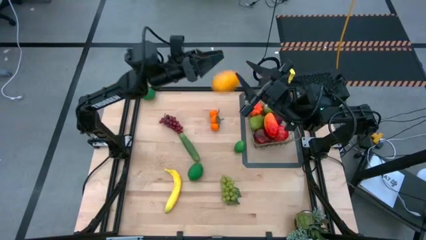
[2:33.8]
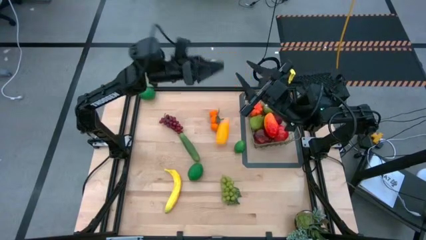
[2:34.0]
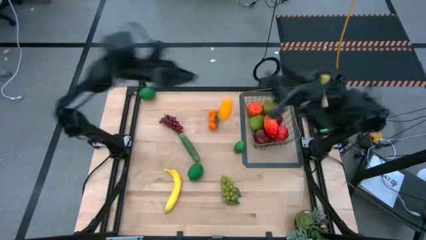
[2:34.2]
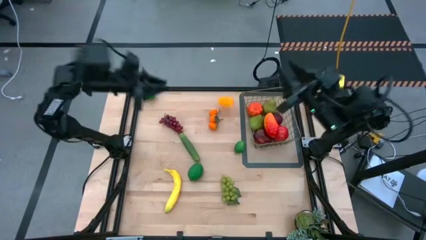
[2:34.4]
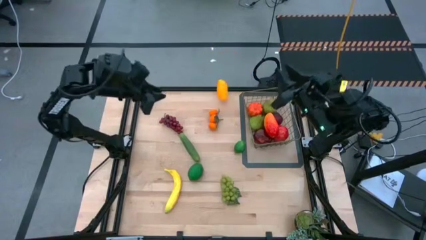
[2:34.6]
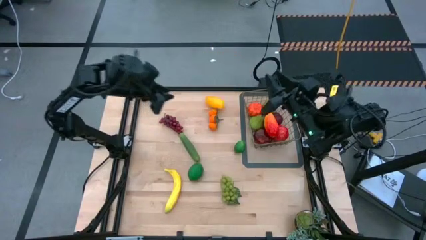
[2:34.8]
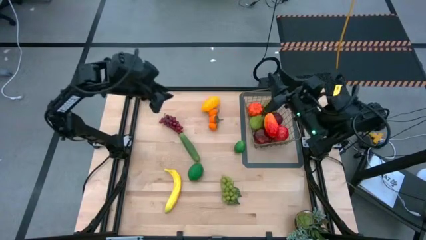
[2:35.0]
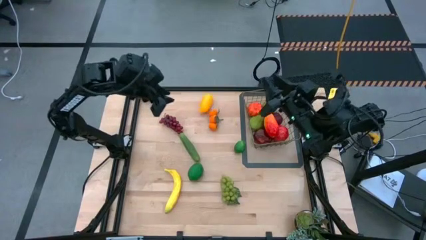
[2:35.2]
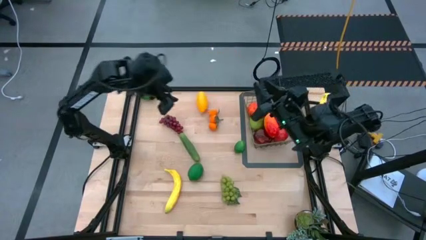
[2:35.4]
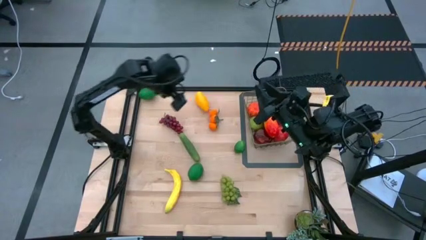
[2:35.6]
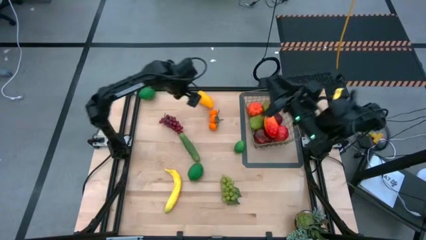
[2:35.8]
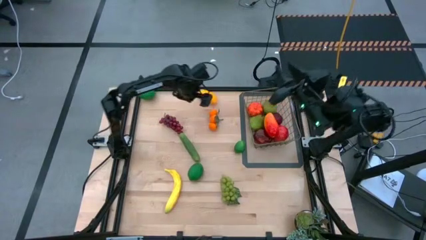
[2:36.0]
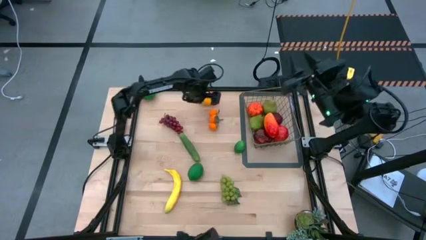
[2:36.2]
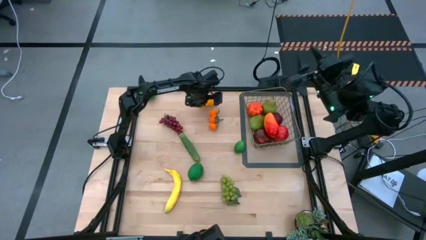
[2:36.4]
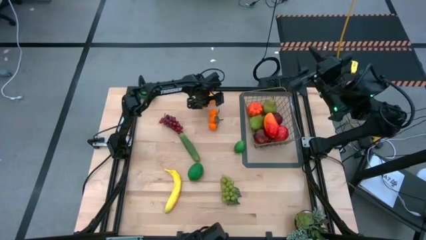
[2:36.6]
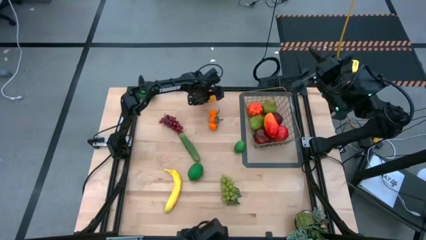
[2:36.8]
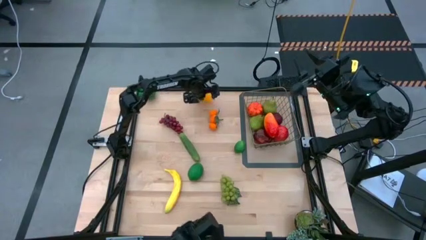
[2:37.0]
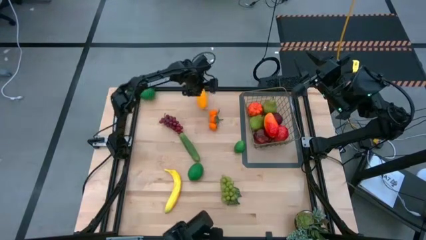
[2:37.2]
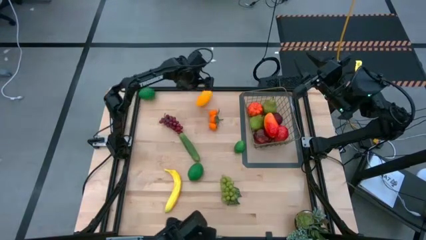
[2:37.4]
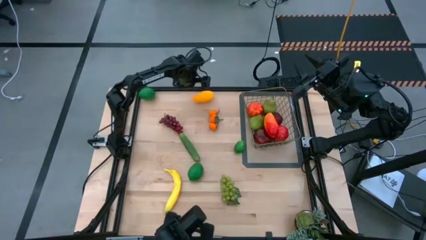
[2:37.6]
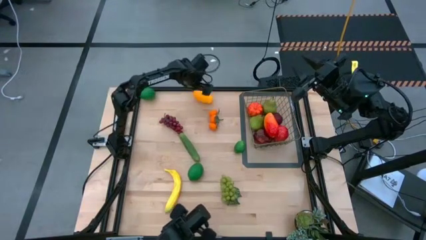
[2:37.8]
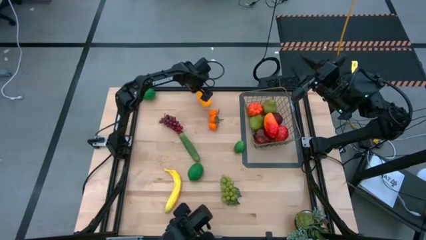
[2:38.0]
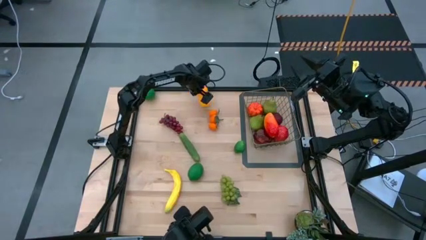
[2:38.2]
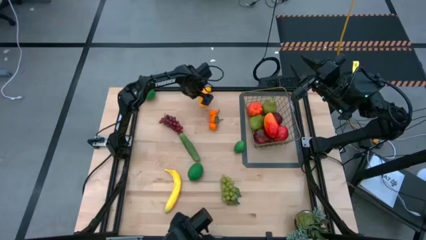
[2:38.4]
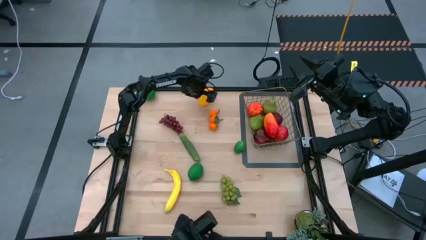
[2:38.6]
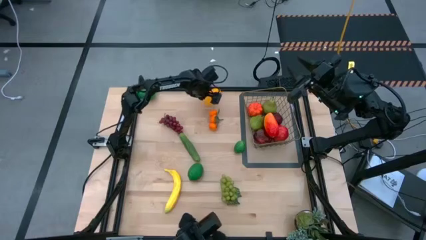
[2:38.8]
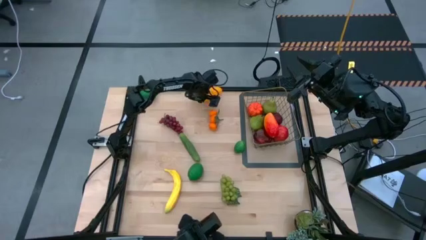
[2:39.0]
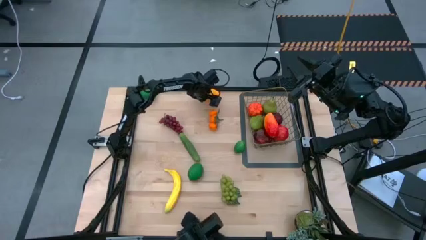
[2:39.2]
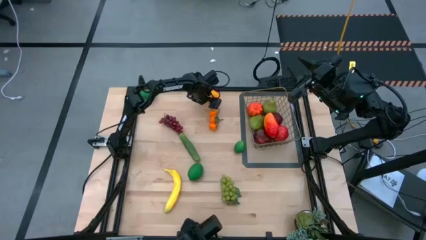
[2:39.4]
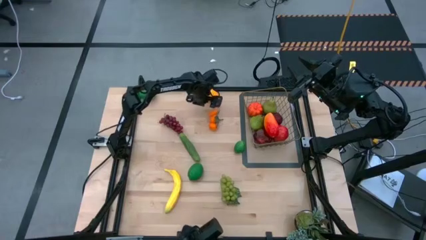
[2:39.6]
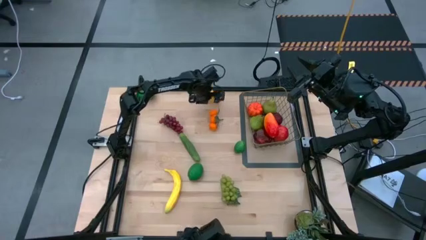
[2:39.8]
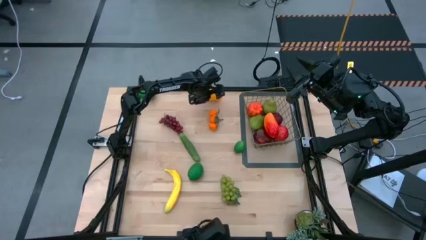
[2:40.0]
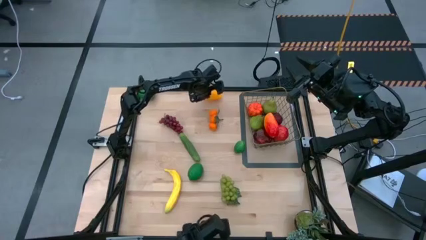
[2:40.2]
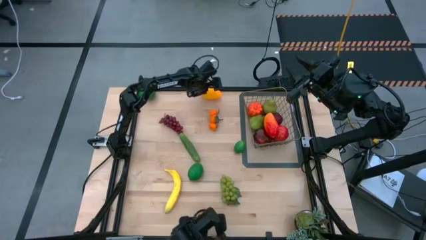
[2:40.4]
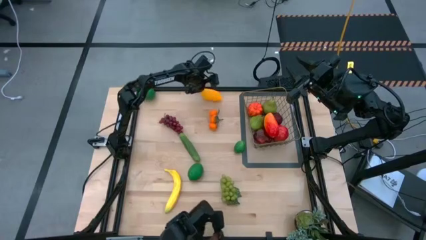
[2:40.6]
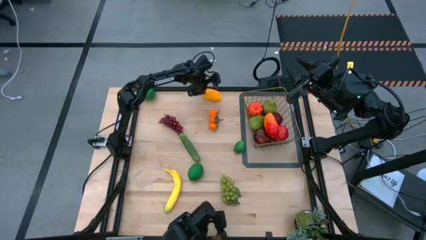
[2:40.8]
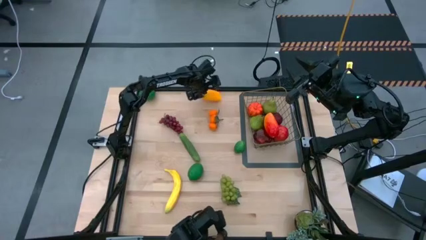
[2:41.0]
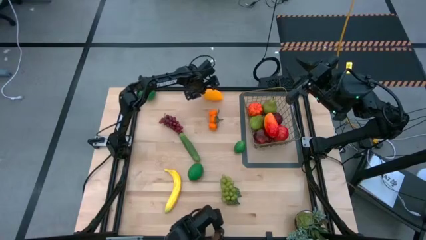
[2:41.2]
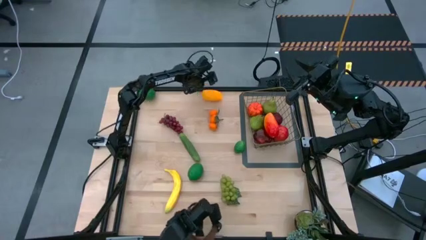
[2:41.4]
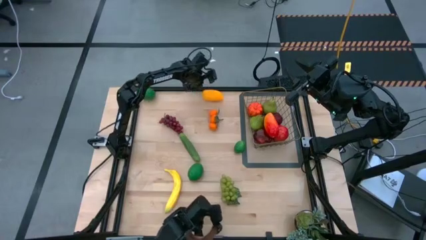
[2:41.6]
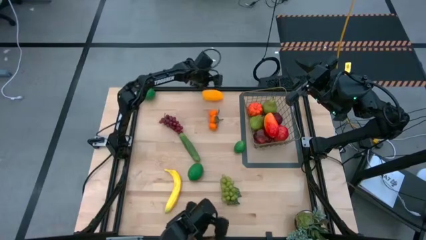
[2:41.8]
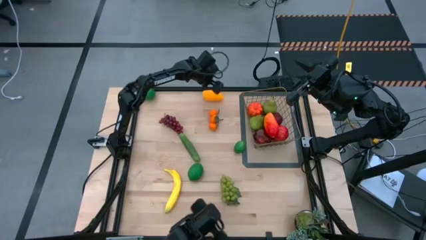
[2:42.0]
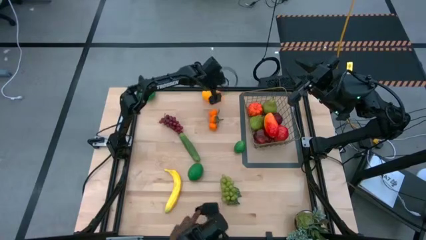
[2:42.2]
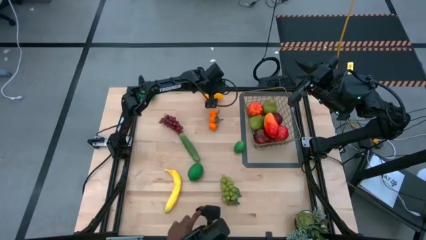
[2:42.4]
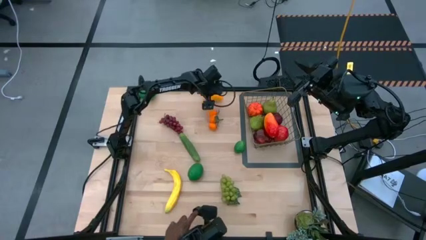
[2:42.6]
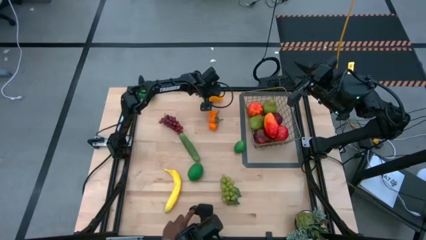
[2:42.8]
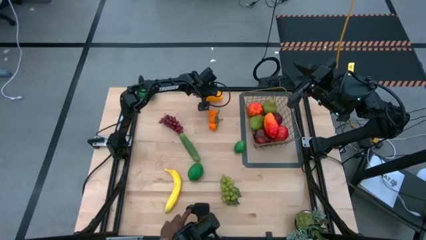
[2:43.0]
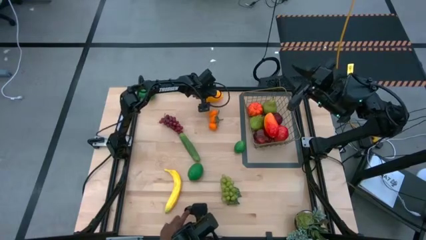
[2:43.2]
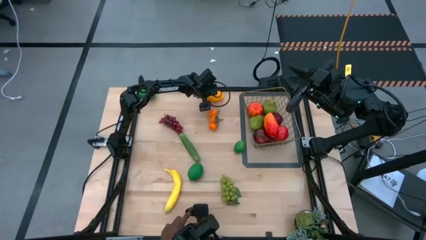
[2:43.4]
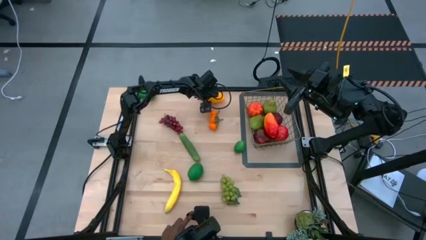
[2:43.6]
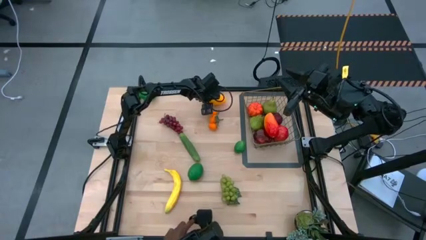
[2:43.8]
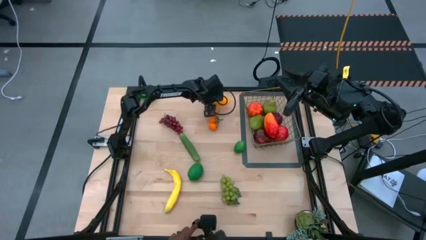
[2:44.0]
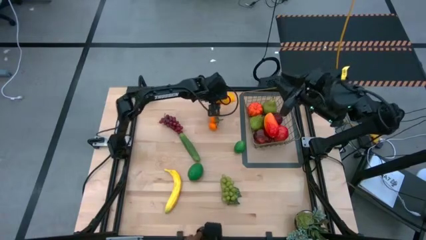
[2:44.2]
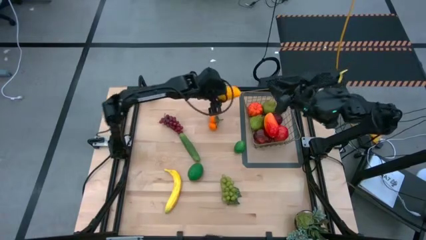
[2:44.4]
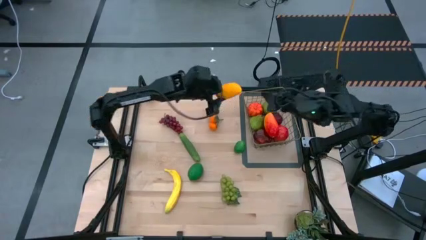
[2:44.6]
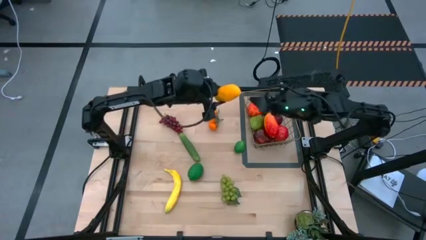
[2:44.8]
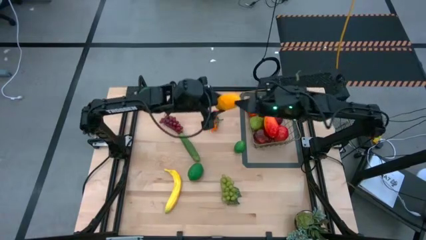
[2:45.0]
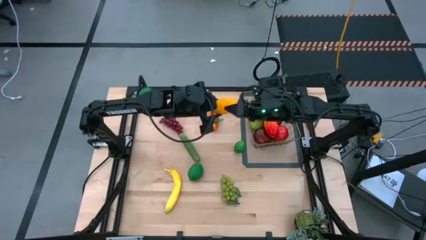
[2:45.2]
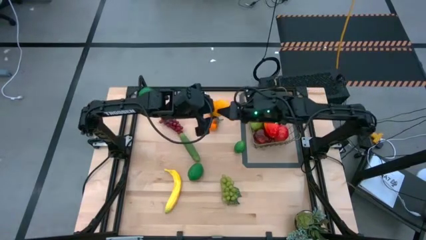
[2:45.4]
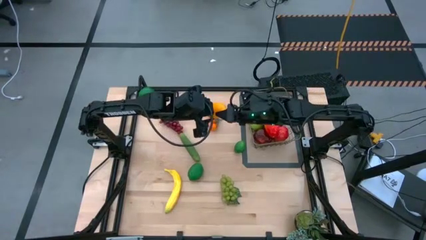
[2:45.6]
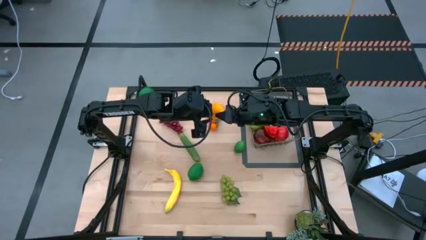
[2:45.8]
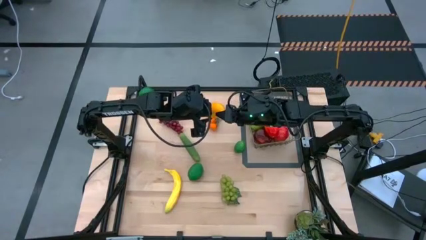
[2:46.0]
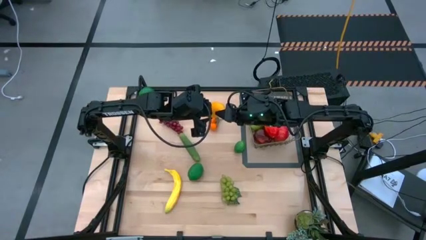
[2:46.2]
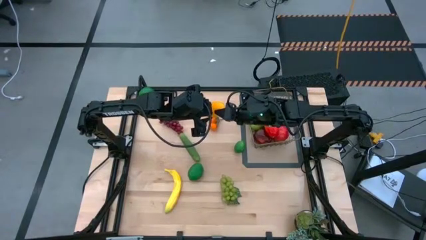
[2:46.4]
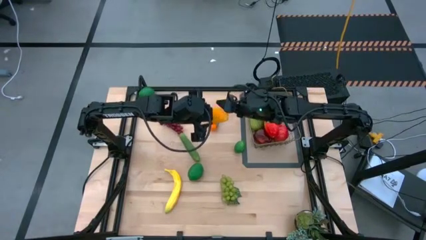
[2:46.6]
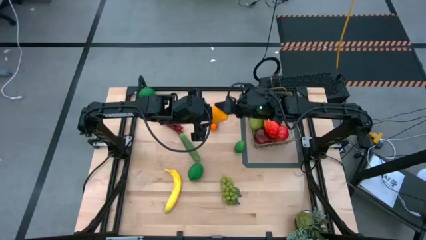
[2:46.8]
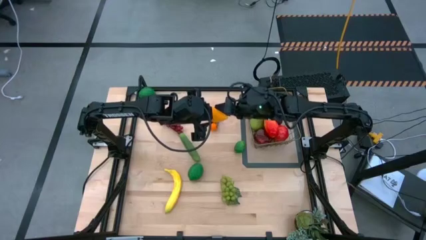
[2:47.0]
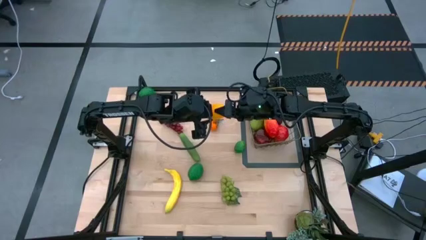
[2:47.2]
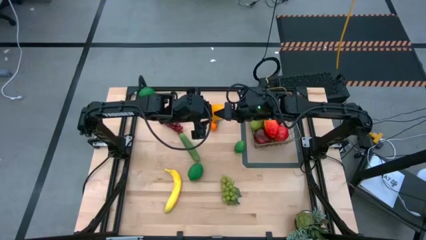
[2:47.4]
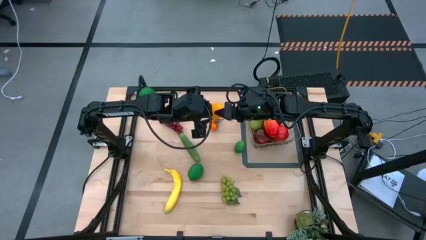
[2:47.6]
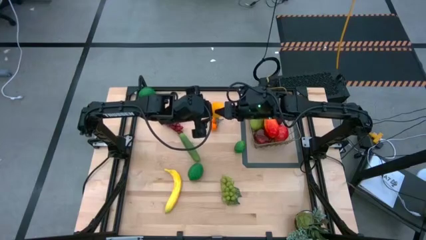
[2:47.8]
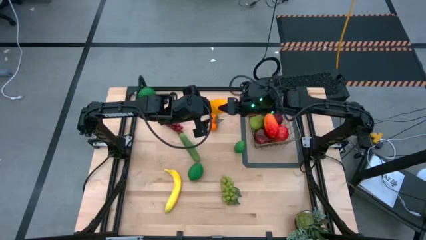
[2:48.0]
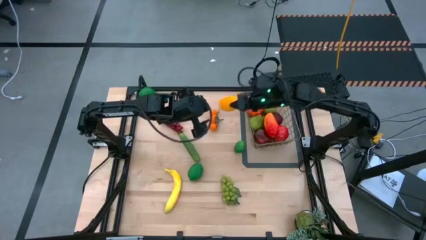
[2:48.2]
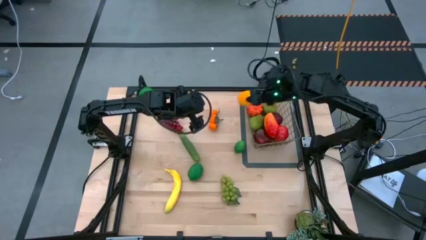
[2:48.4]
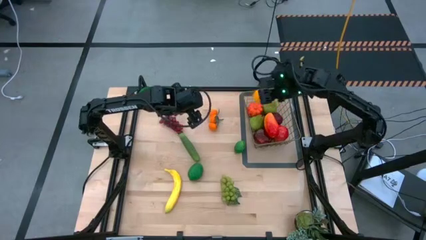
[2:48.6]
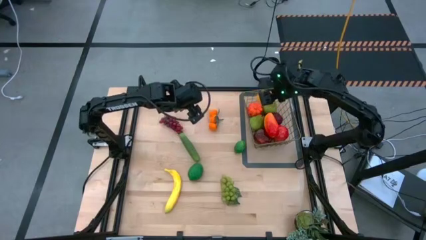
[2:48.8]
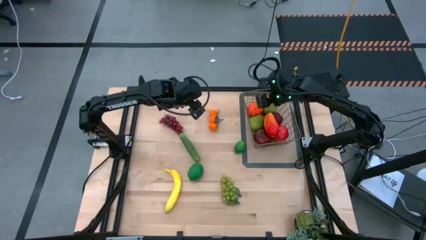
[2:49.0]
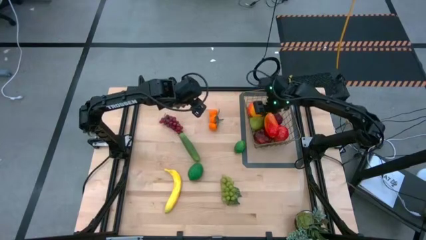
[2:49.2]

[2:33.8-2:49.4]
Task: Build produce basket
Put the yellow mango into the wire basket

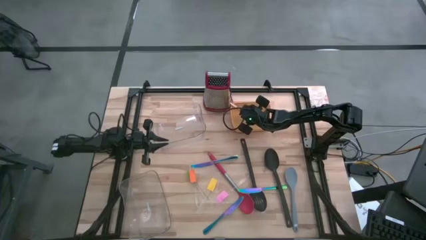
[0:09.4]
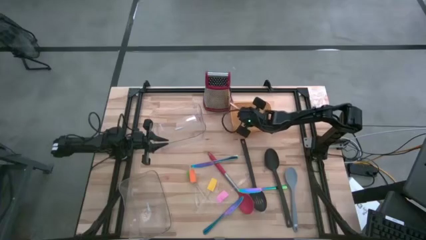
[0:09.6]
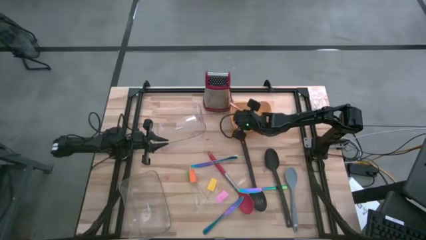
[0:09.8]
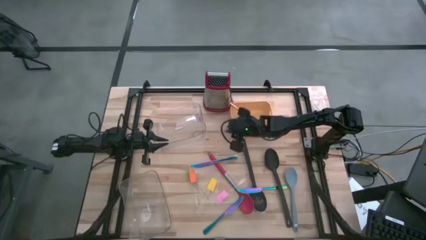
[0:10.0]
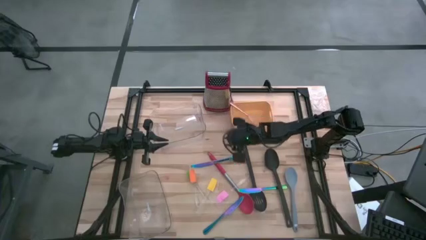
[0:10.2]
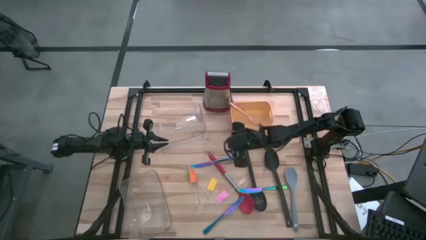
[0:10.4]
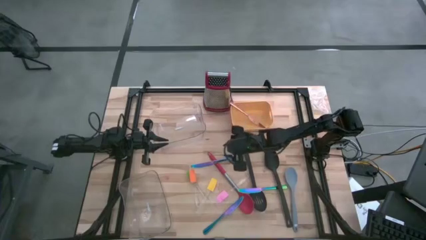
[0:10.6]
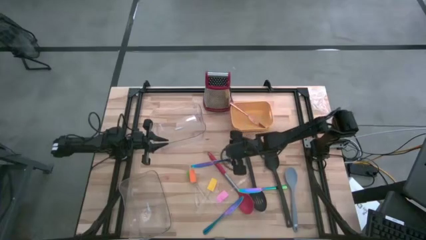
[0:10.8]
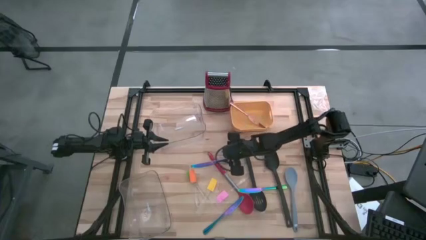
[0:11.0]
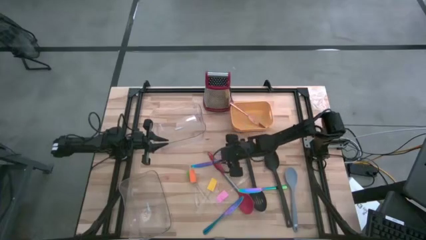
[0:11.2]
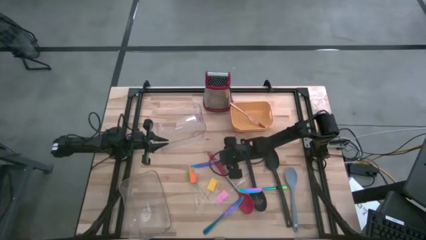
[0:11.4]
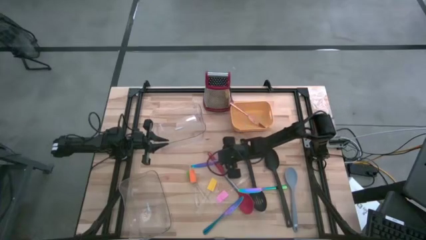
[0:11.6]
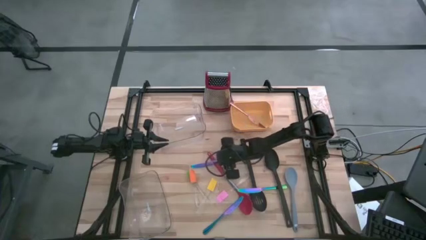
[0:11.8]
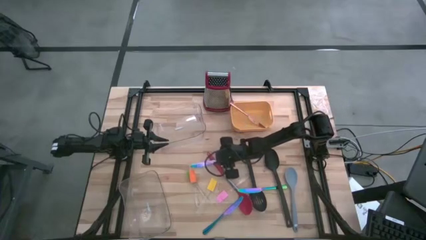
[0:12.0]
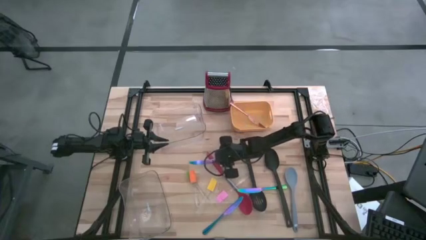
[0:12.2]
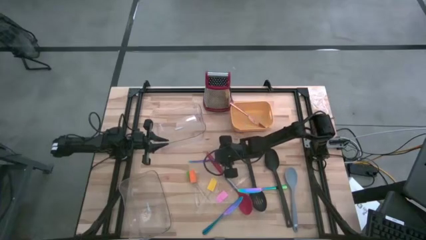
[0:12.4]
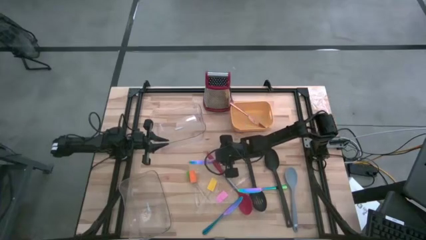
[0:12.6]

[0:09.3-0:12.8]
Task: Pick & Place Kitchen Items
Put the blue knife into the yellow bin
